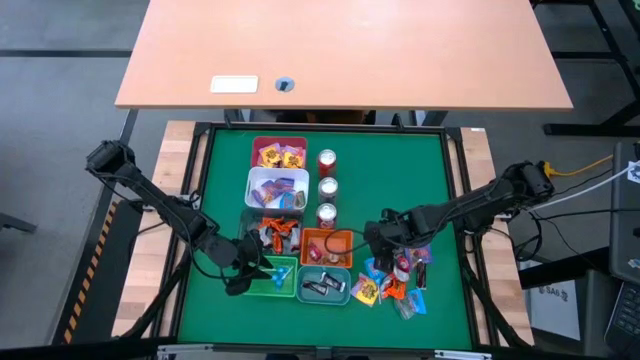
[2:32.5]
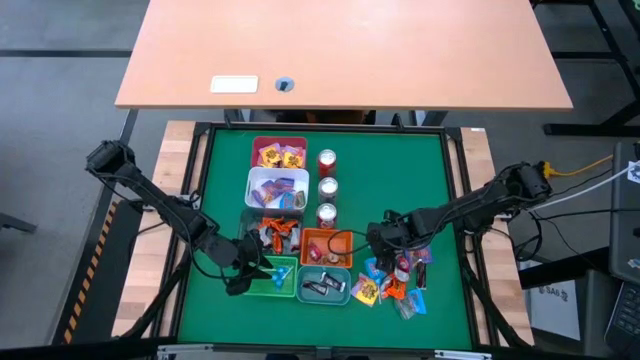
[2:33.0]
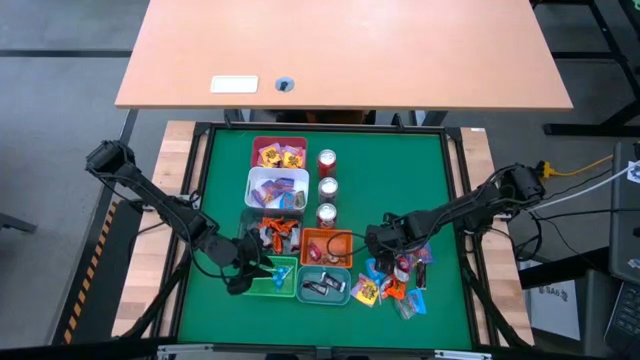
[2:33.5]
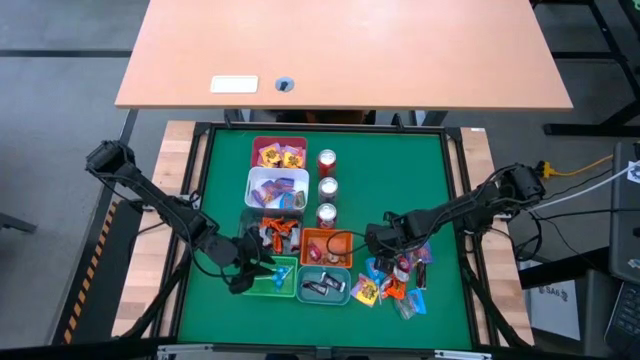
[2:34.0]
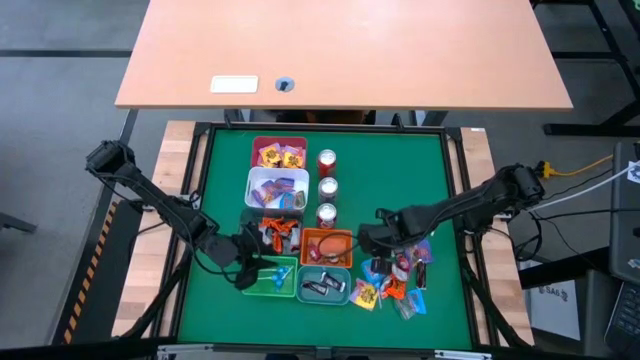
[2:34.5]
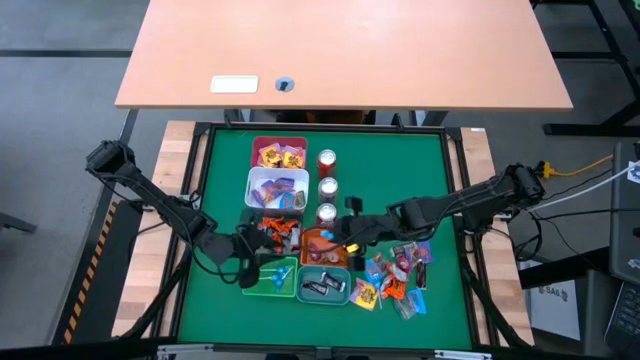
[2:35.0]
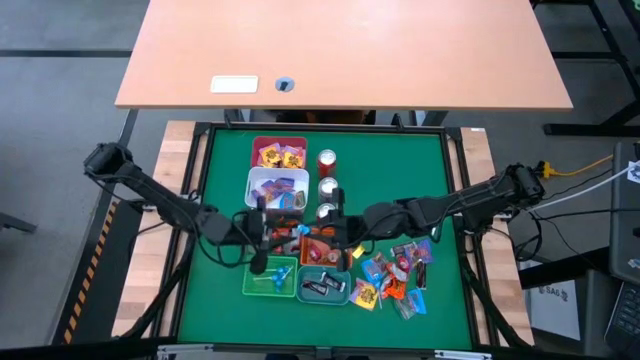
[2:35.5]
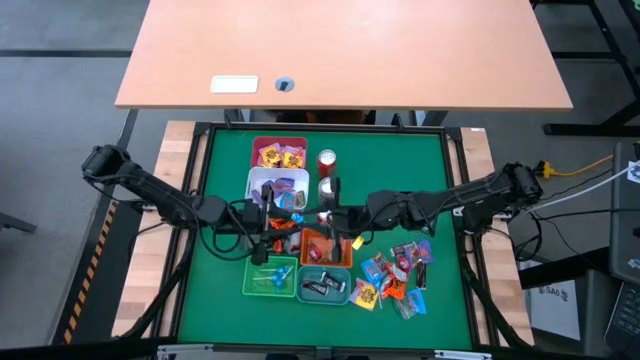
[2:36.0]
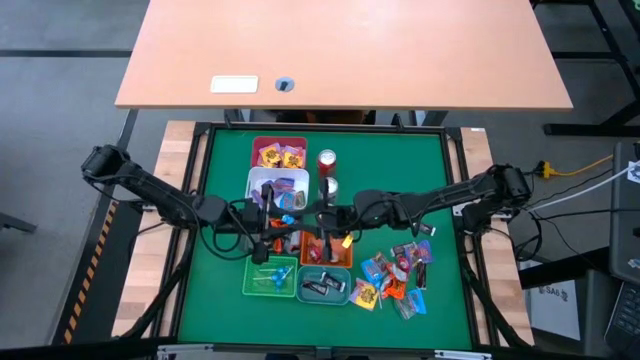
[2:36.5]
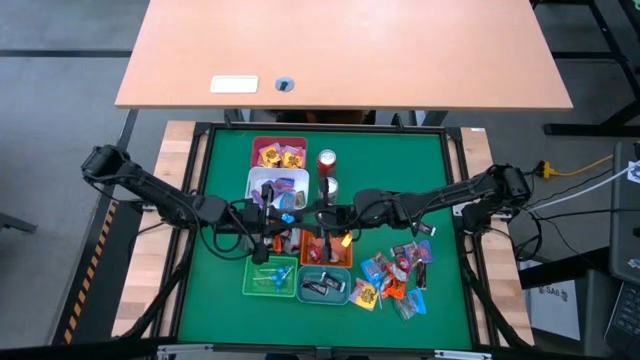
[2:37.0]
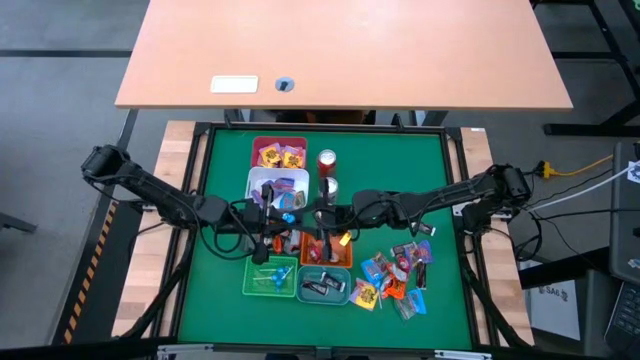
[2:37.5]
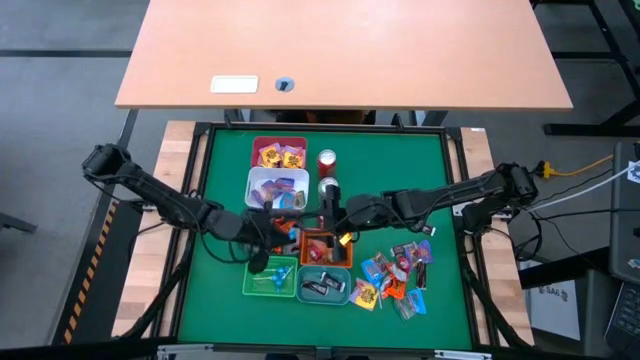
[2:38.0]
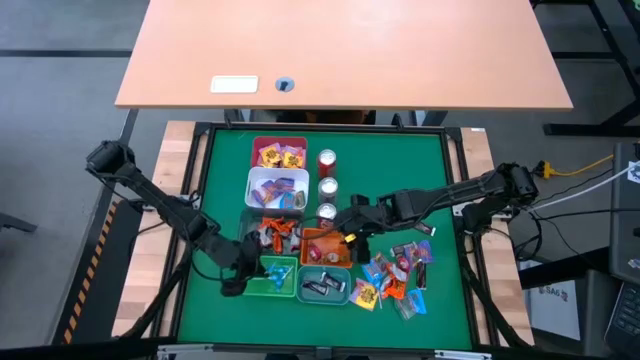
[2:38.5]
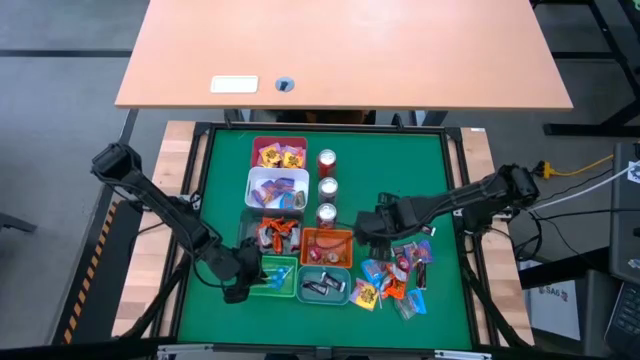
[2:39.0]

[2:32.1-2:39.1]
Task: Sort candy
Put the blue candy into the green bin

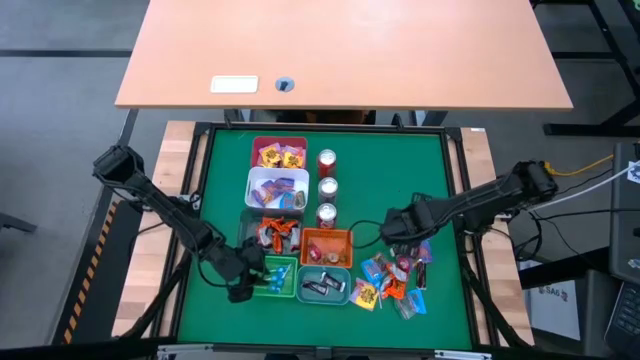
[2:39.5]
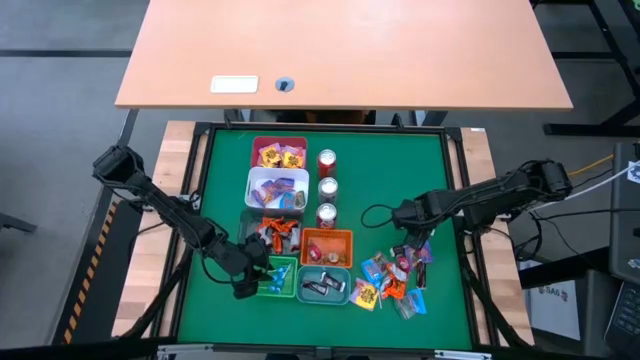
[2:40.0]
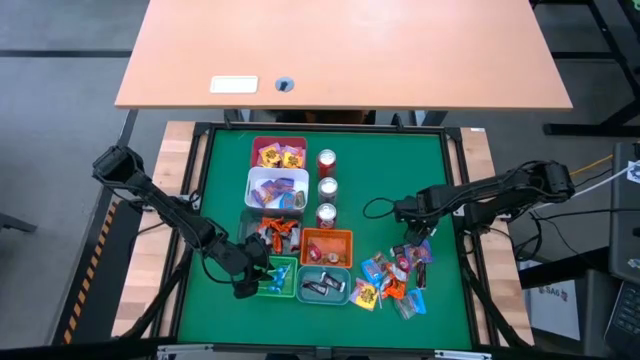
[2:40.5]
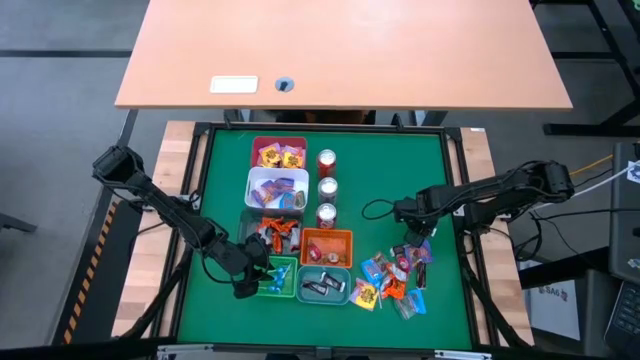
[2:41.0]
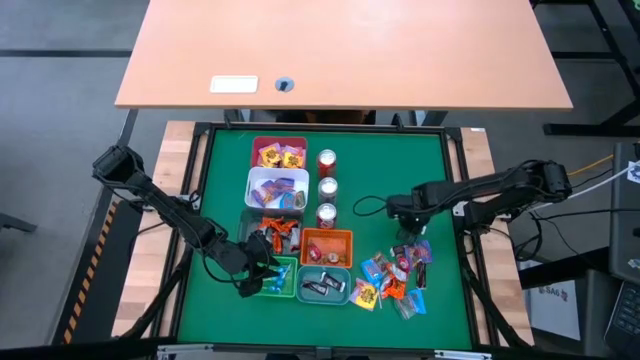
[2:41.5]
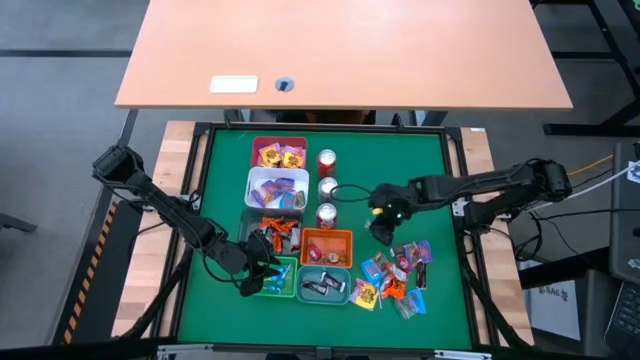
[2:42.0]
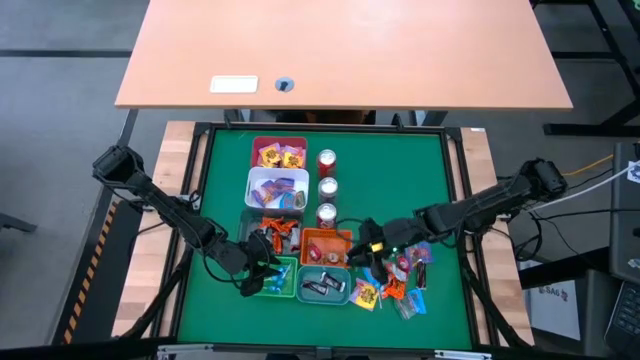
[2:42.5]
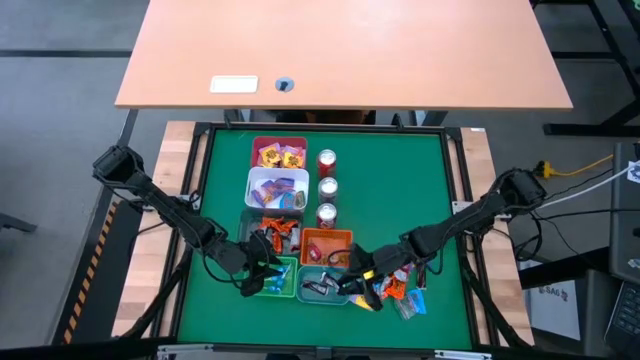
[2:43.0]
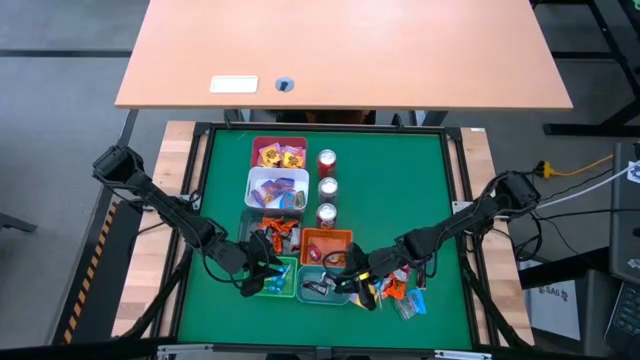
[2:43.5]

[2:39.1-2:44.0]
Put the brown candy into the teal green bin

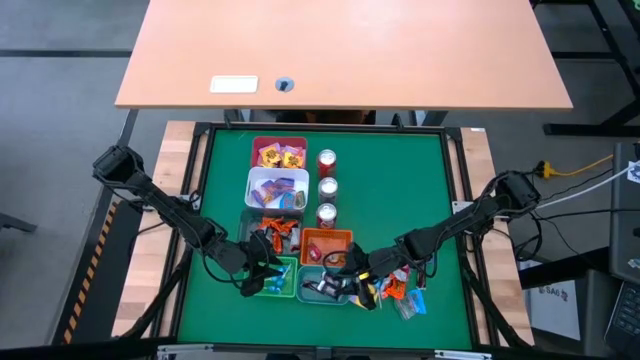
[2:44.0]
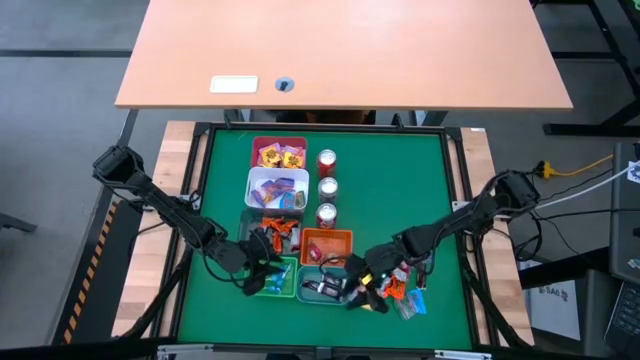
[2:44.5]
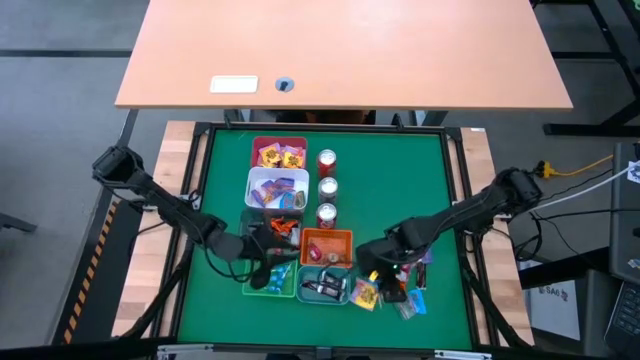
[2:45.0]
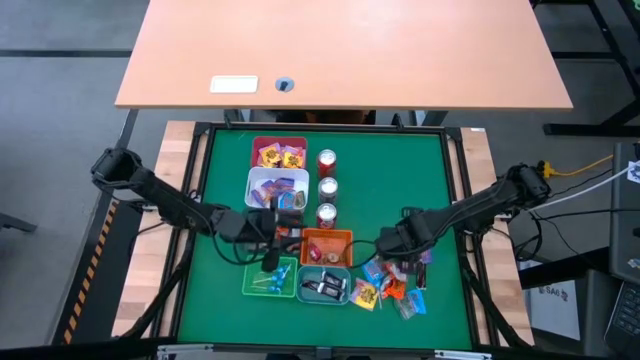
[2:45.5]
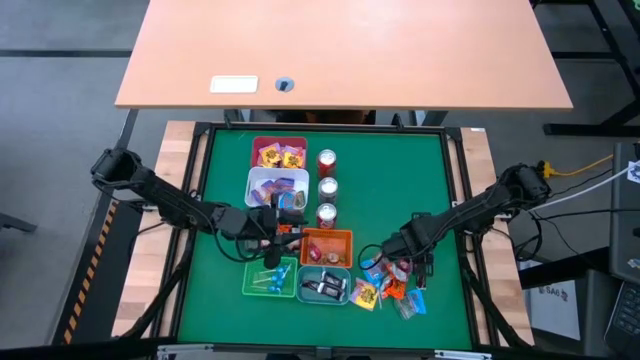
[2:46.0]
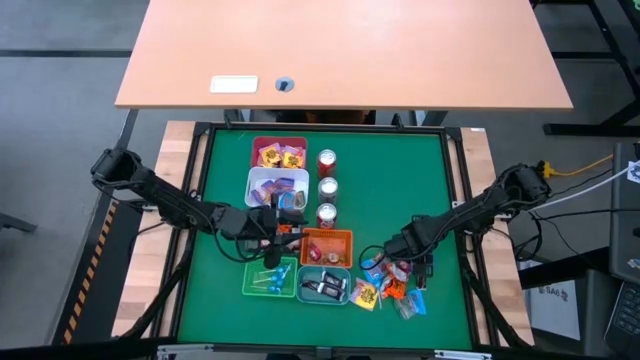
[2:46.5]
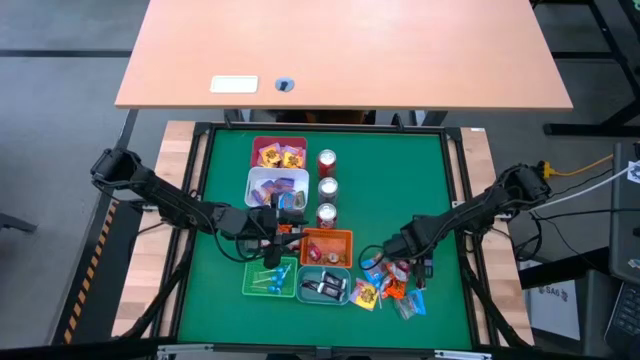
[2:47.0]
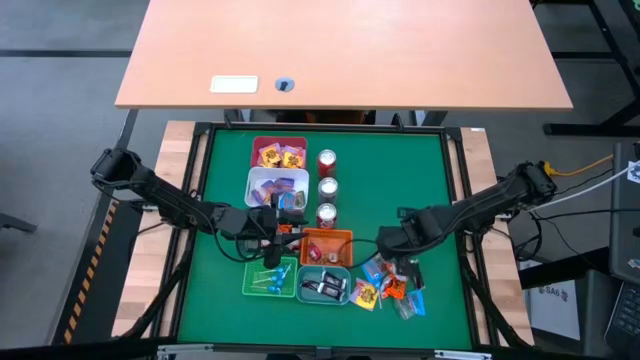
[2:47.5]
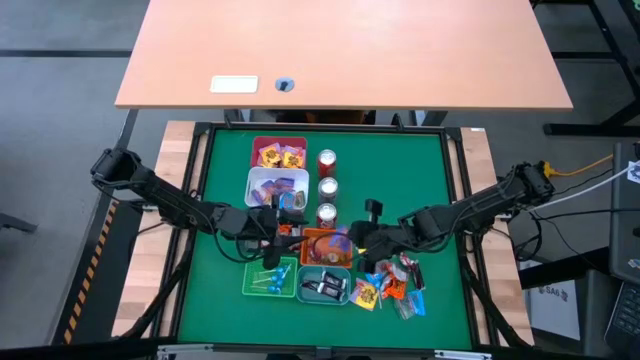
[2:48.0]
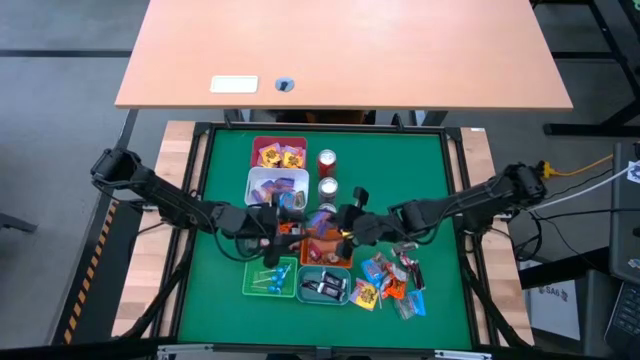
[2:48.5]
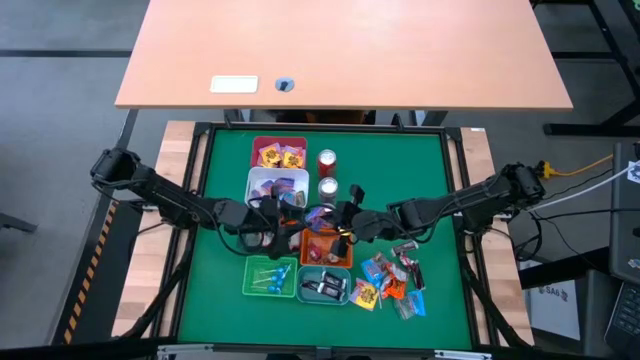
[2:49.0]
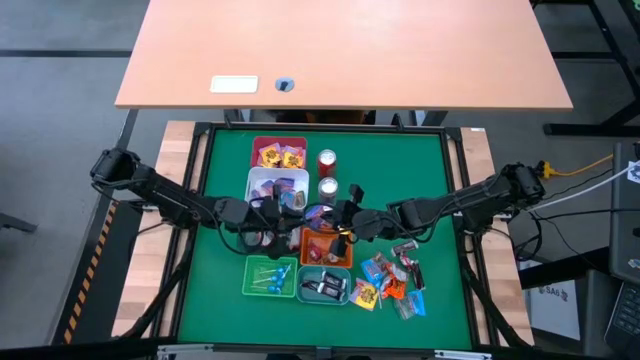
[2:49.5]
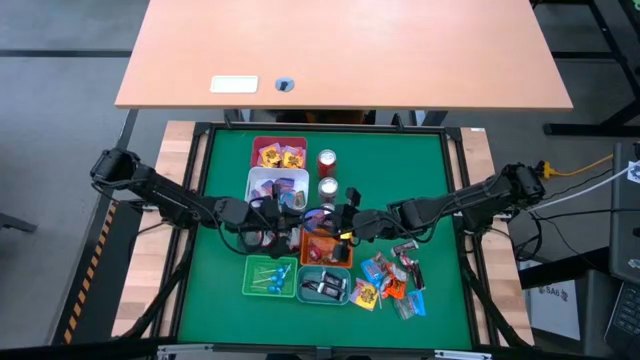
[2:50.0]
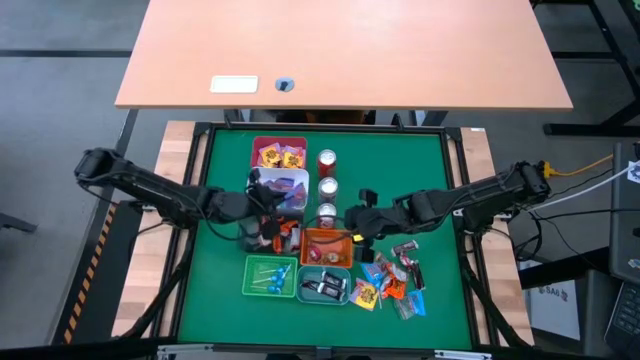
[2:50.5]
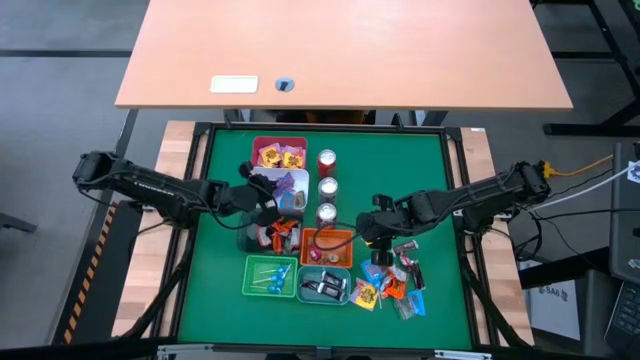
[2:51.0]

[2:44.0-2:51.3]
Put the violet candy into the white bin

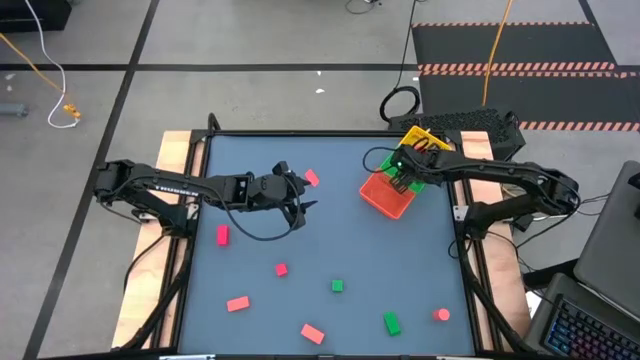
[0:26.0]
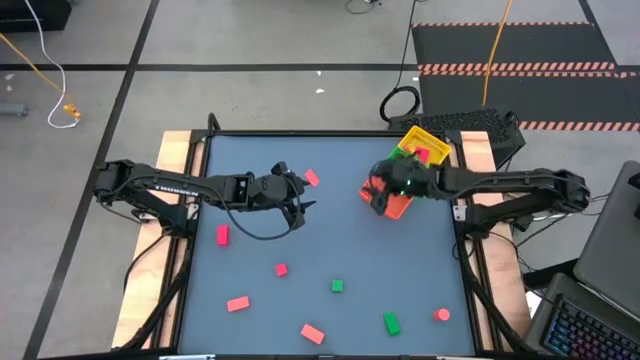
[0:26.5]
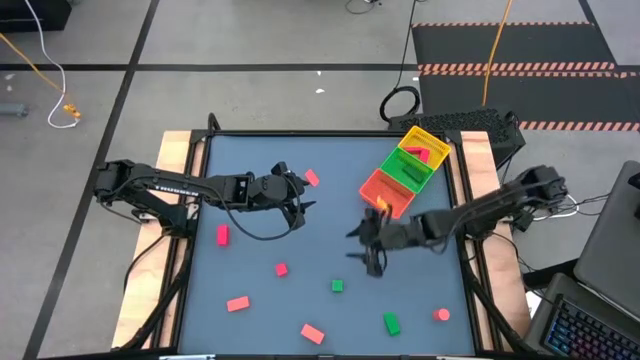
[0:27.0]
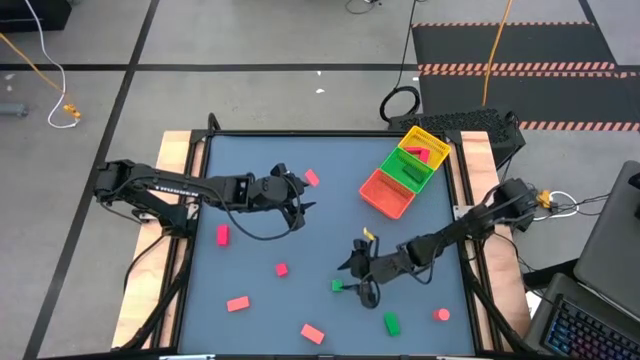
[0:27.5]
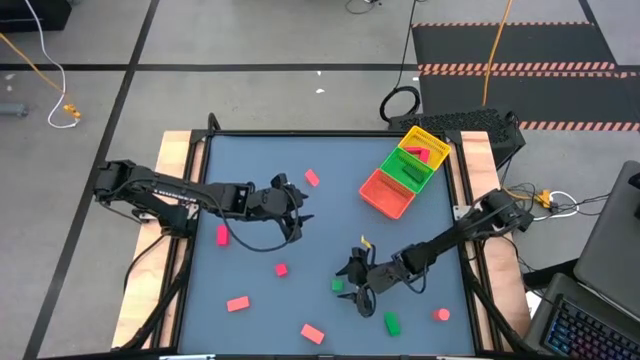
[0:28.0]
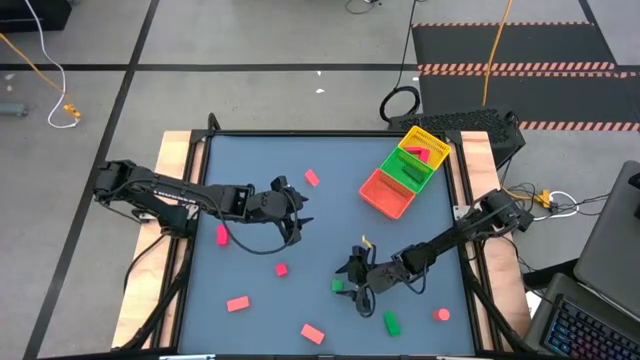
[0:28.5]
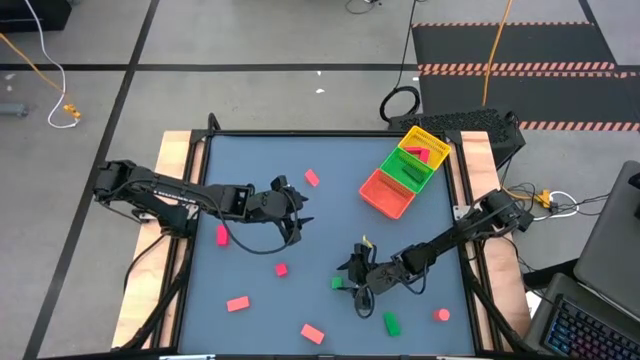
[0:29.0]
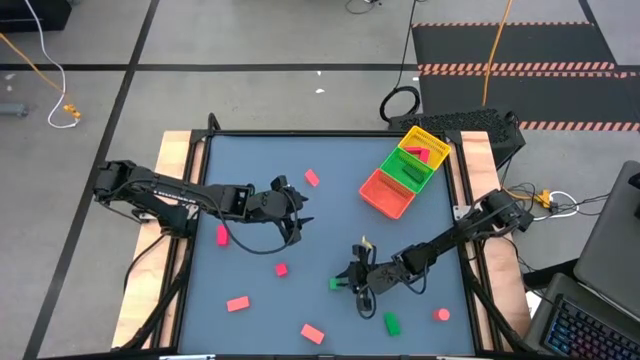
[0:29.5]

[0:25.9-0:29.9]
Task: Sort & place blocks by color
Put the green block into the green bin
